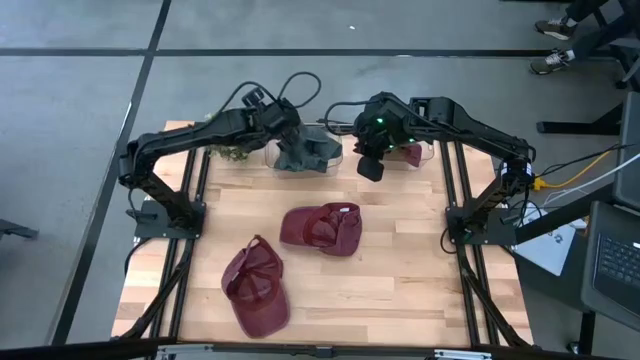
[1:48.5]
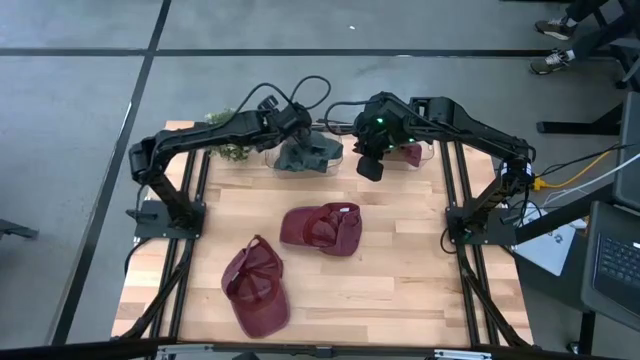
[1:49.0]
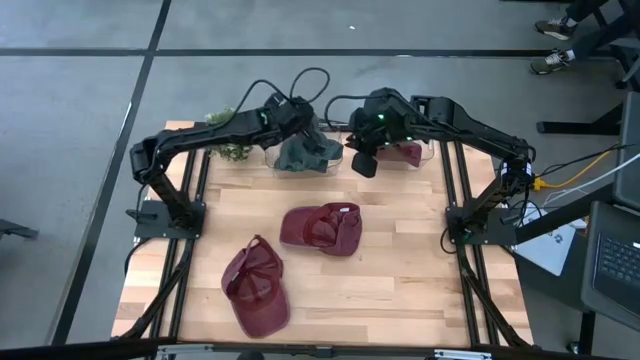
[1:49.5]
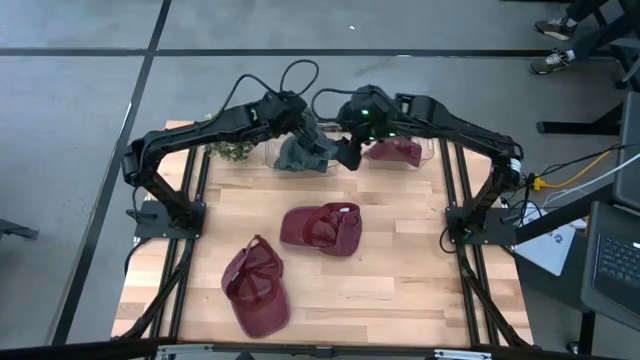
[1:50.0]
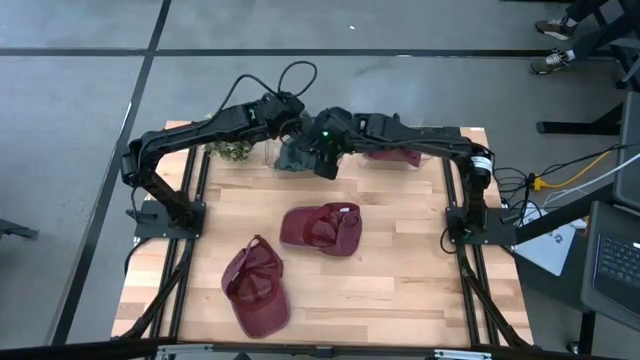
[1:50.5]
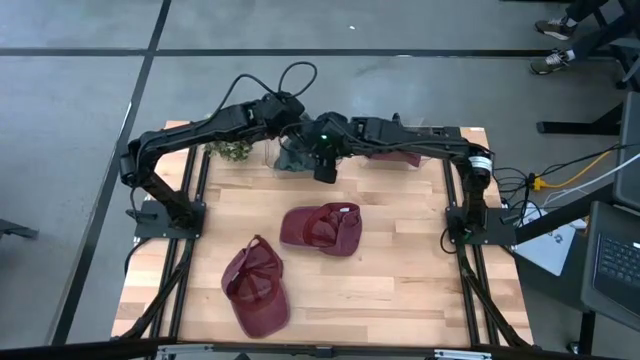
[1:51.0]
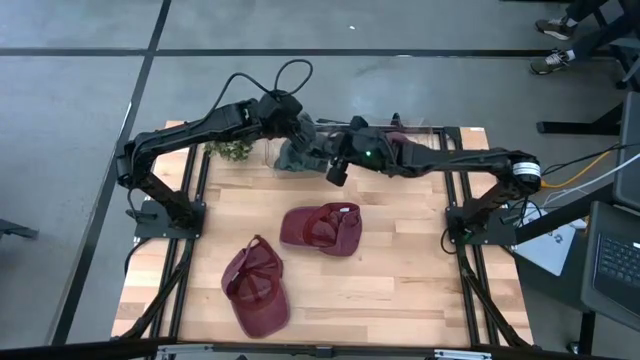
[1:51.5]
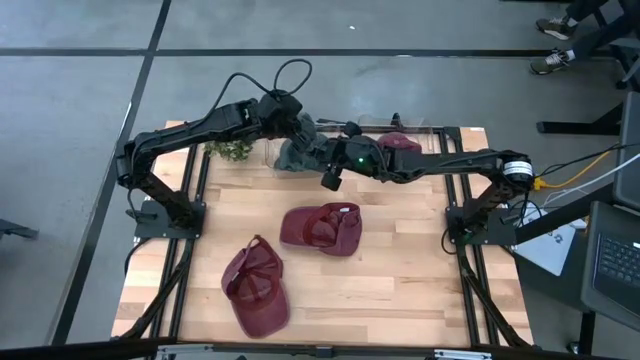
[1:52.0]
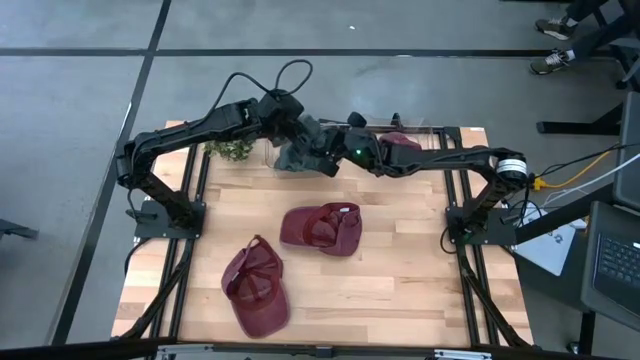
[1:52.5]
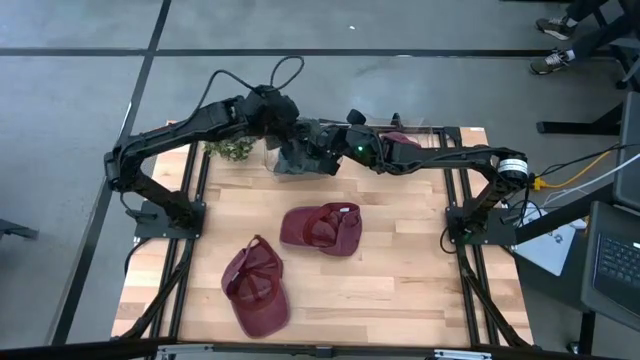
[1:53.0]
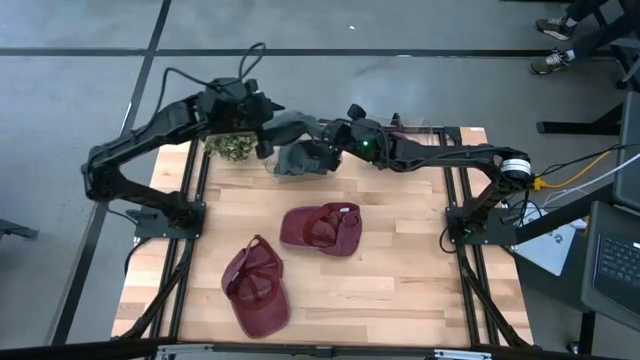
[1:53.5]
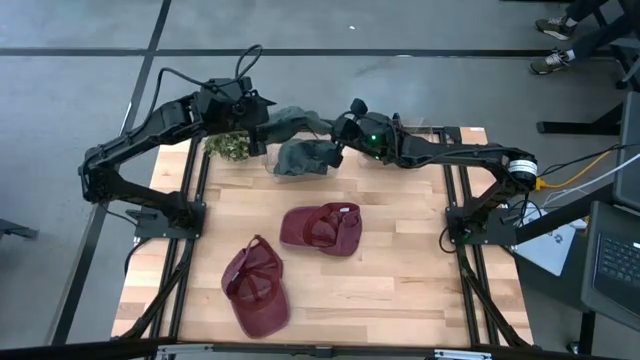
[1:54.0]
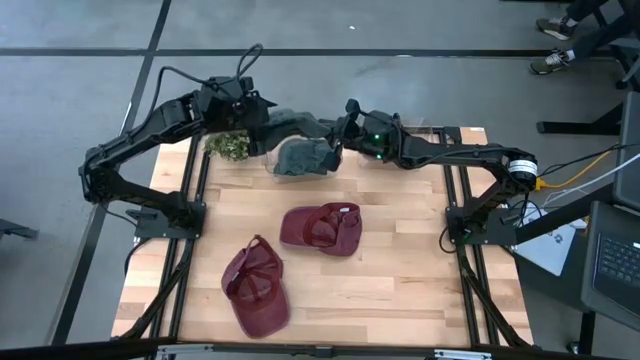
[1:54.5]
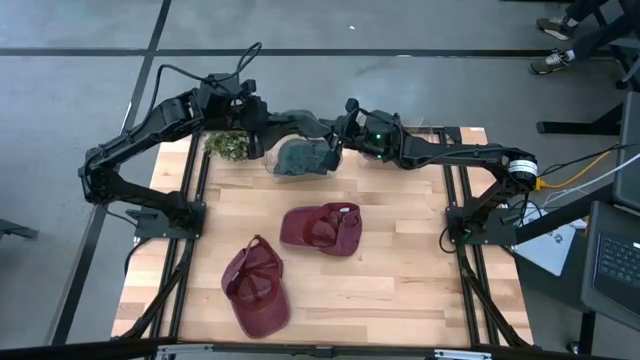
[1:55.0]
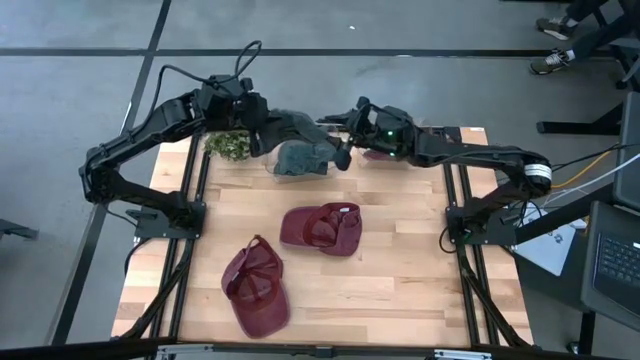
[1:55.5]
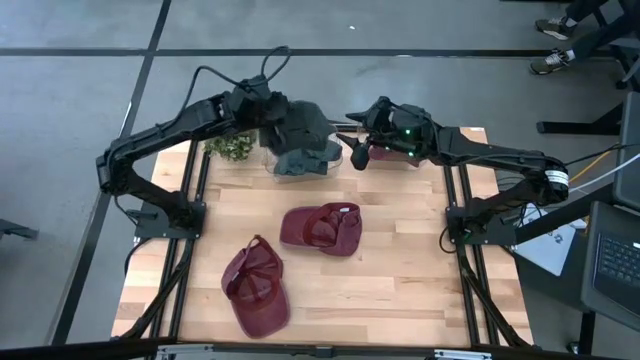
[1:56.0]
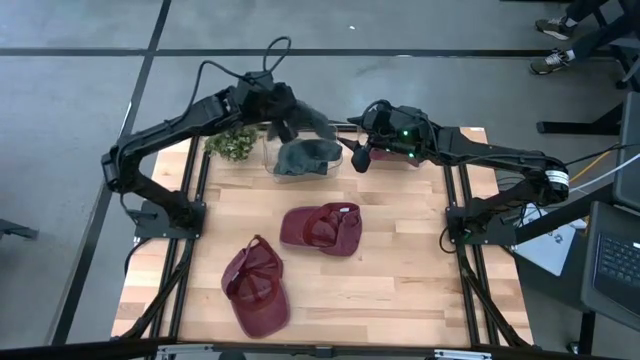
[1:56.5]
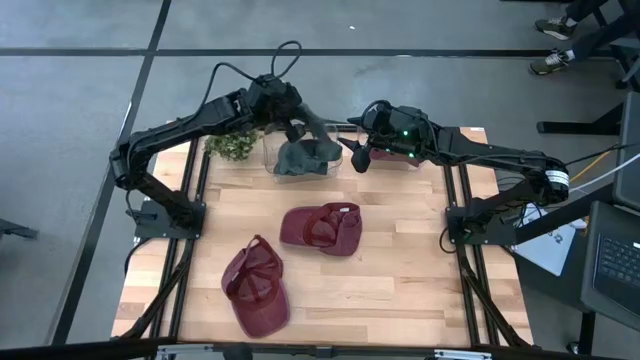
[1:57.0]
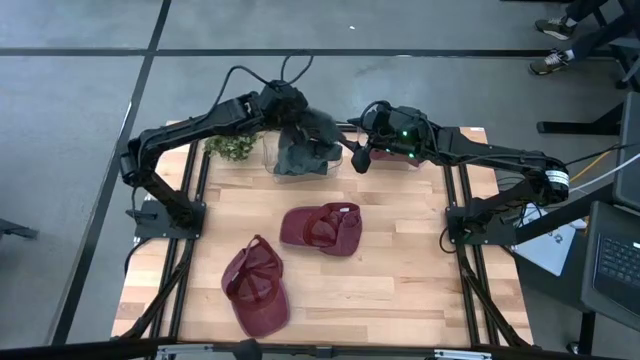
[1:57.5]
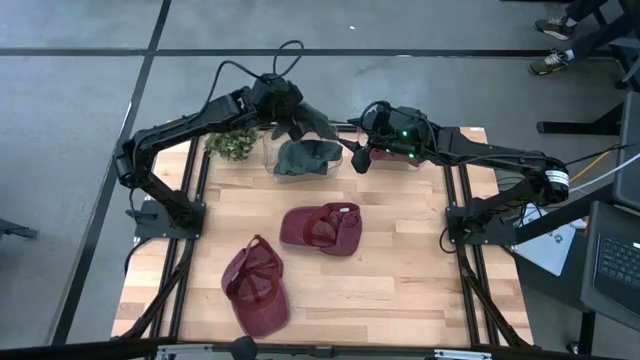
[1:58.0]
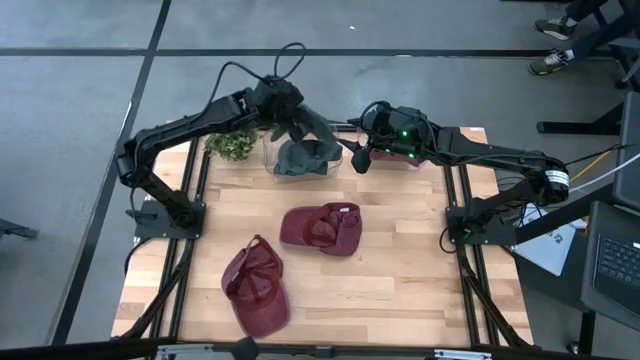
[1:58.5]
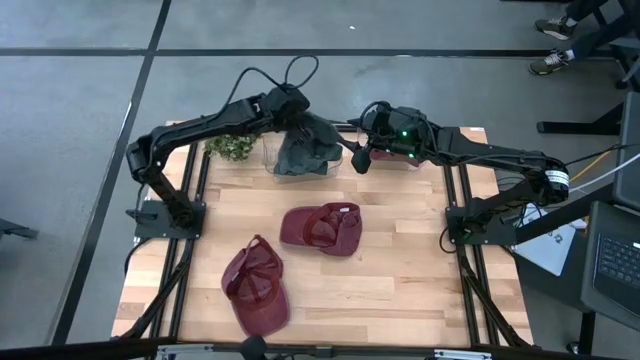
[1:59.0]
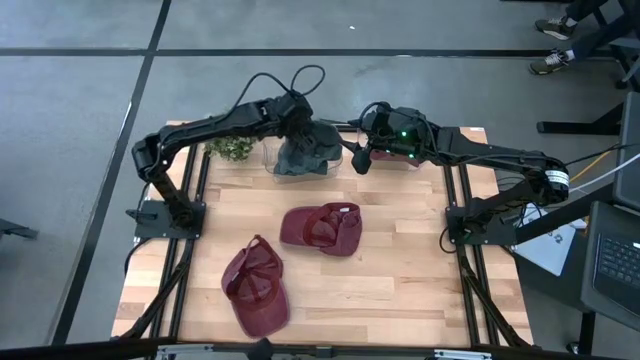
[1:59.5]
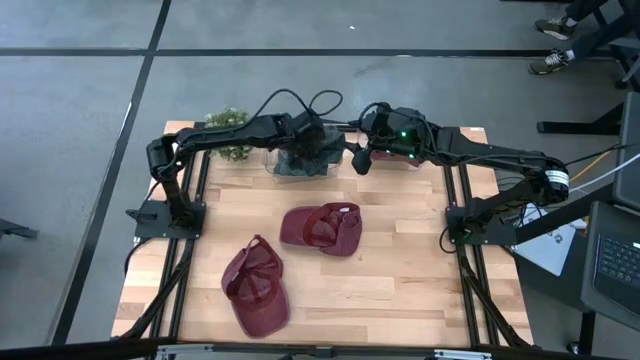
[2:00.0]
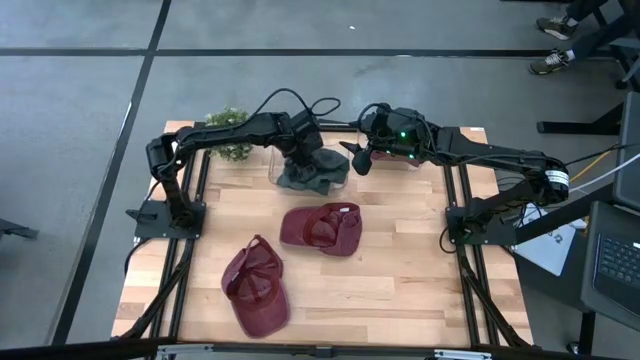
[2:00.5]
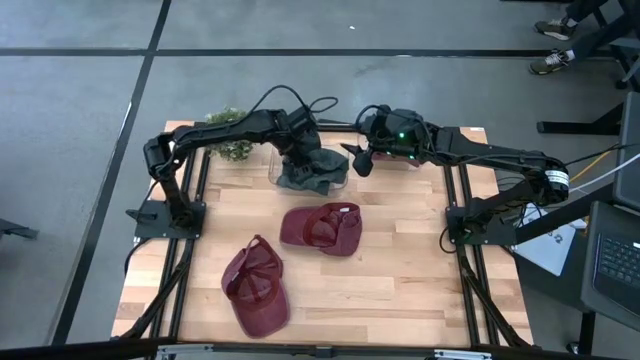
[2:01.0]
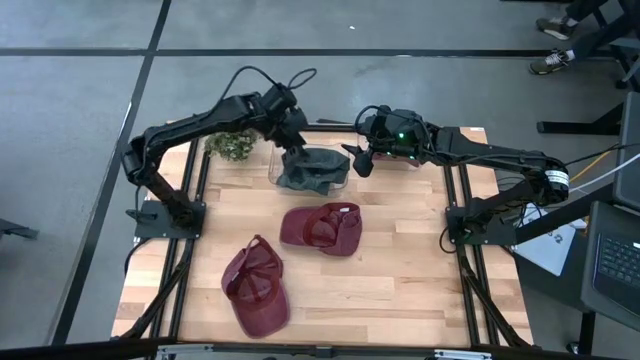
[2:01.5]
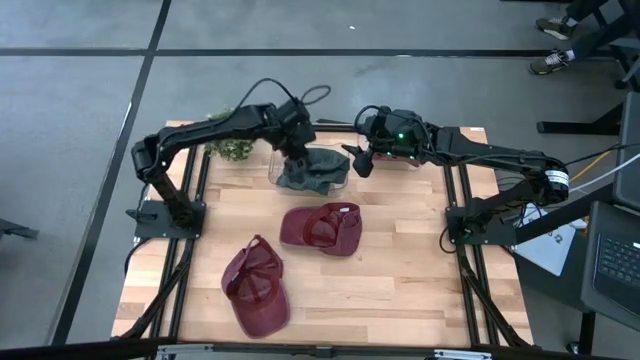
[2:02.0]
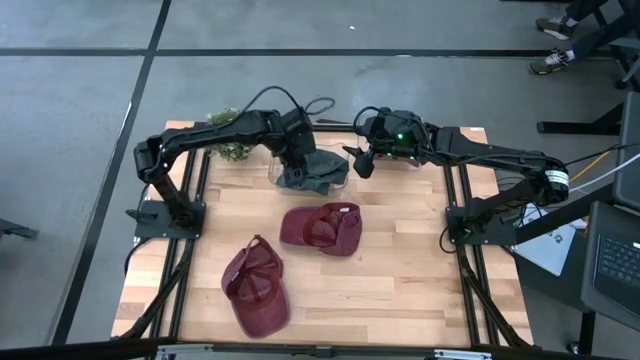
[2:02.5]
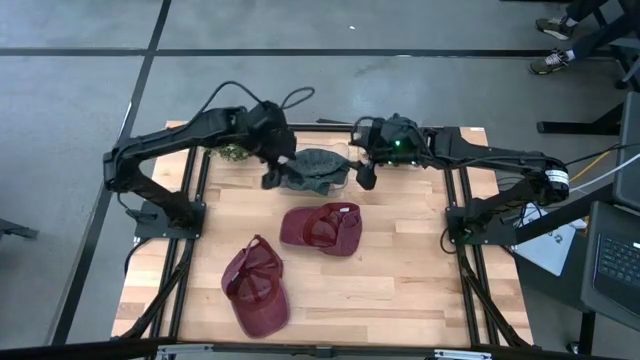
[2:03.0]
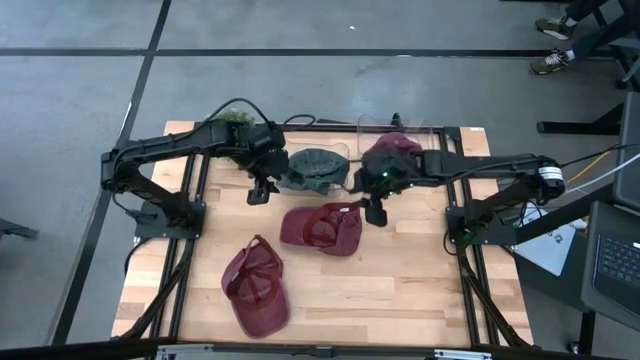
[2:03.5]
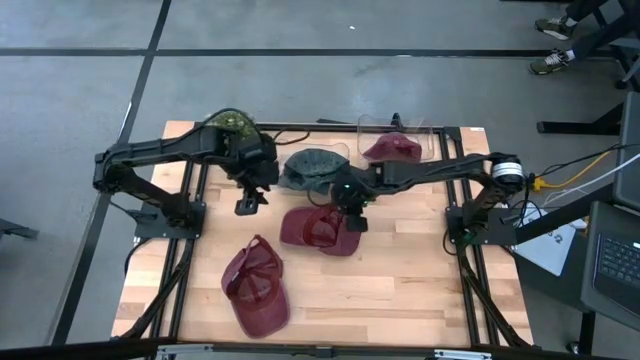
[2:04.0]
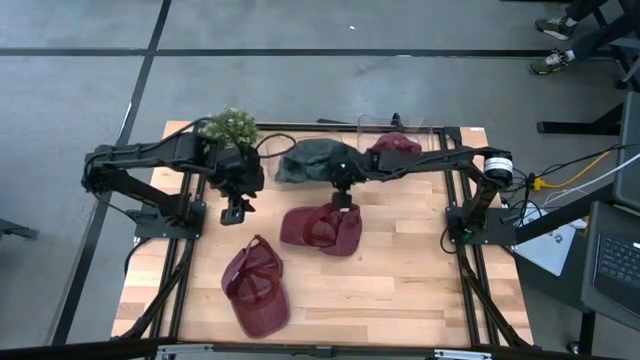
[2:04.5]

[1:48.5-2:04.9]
Task: Pick & Place hat
Put the gray cap on the gray cap in the left transparent bin

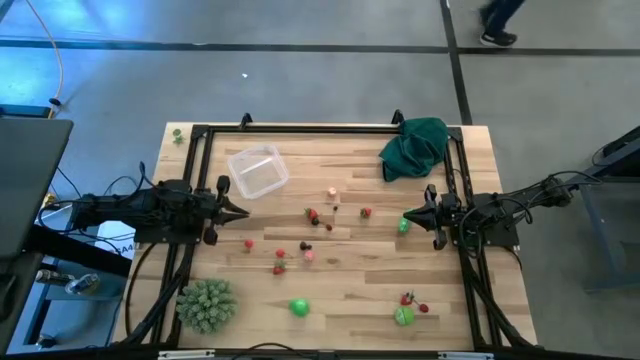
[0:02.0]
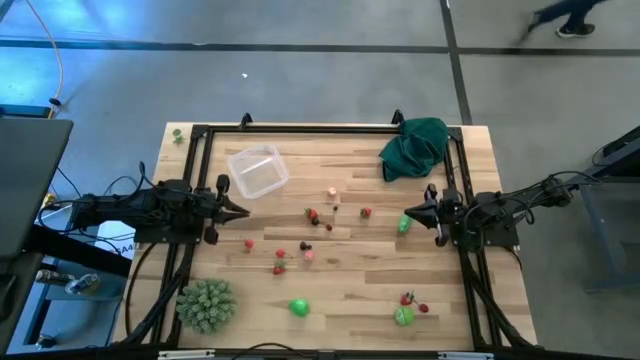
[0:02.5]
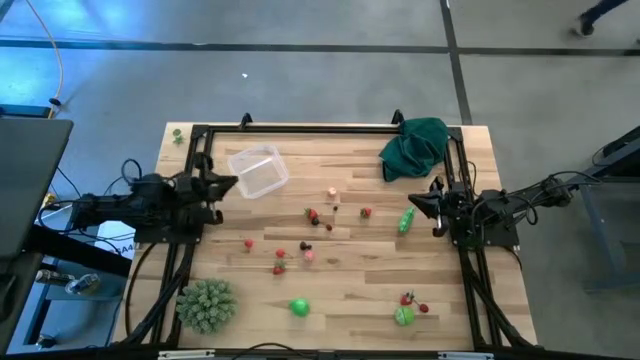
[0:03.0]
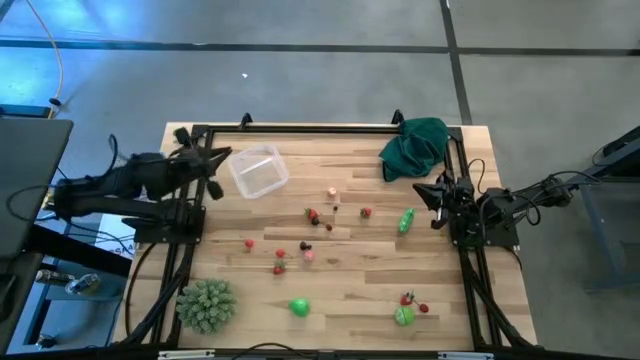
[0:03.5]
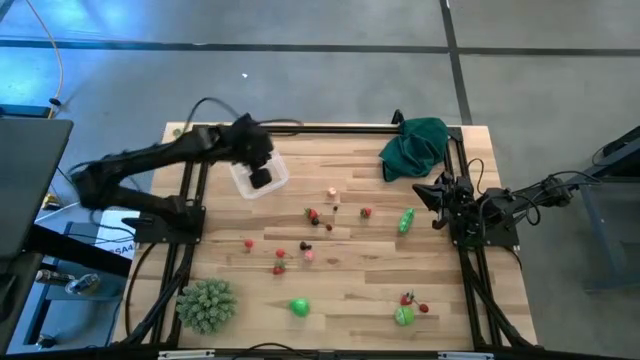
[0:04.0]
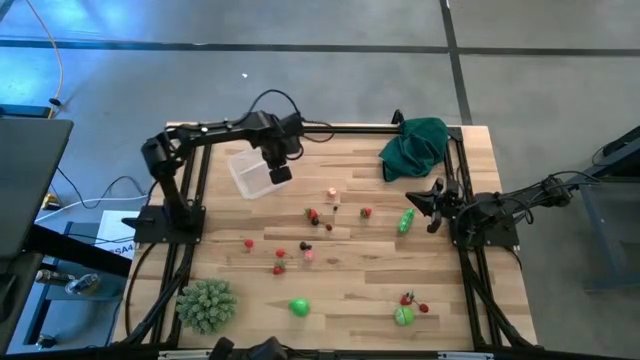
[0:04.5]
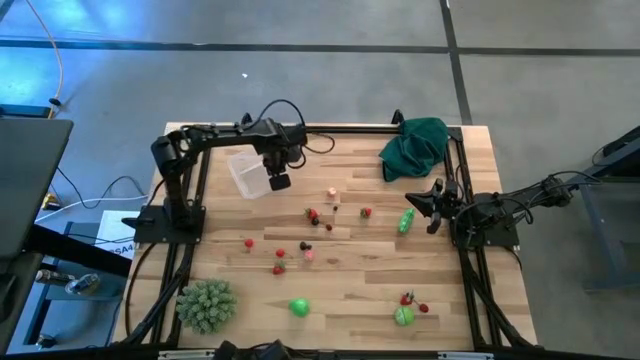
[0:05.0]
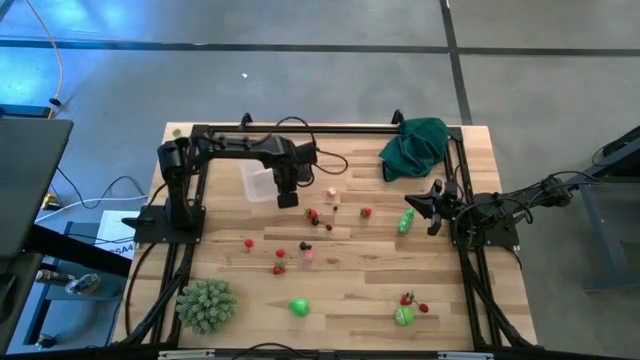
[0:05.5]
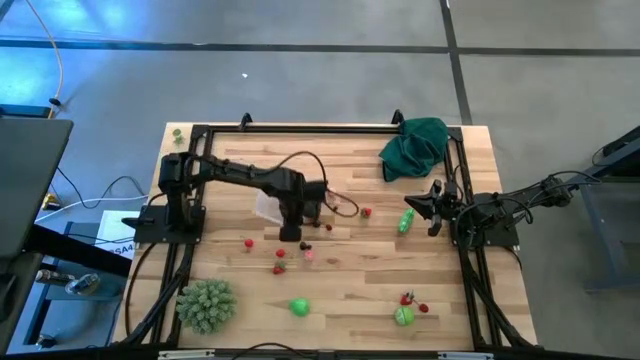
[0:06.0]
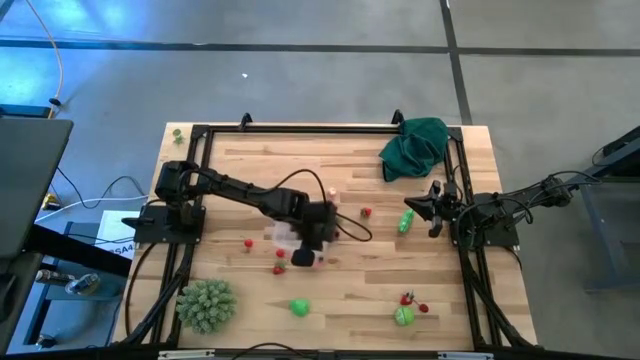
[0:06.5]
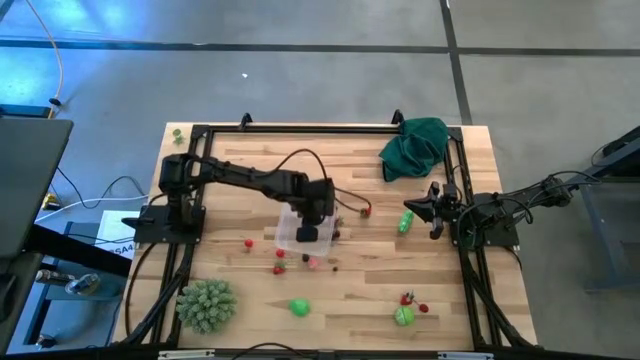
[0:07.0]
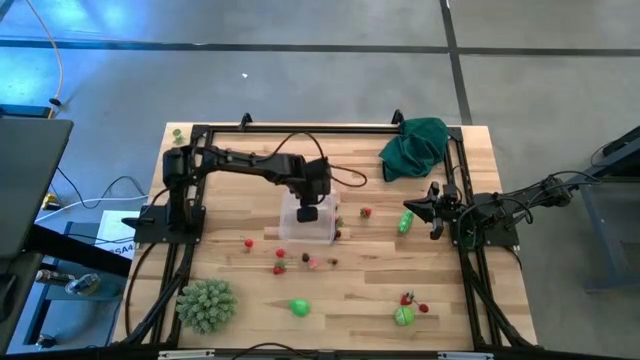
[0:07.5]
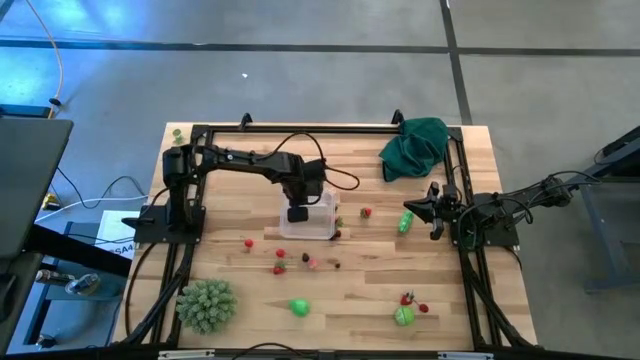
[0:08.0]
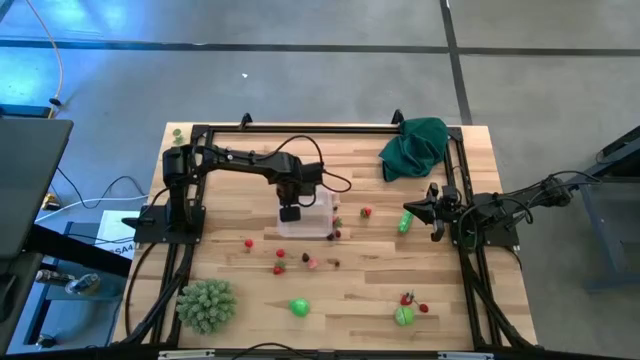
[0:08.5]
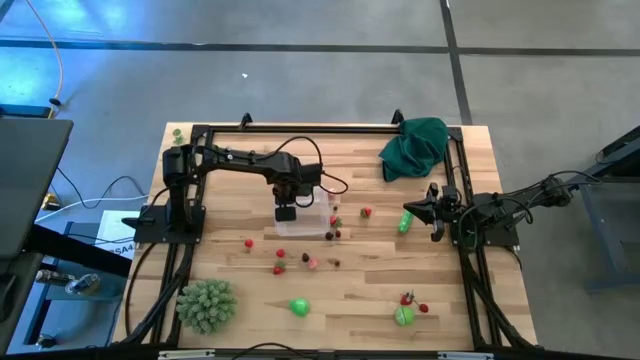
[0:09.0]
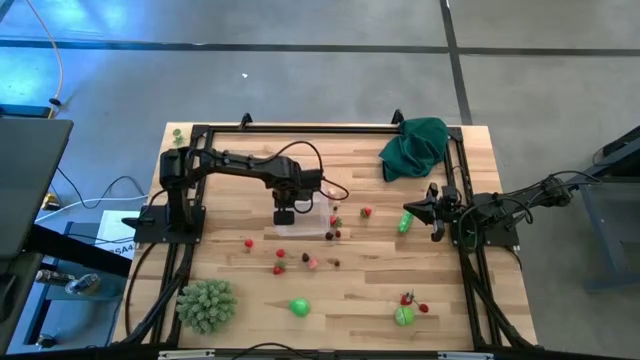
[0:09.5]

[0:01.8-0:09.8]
Task: Pick and placing Produce into tupperware
Prepare the transparent container
